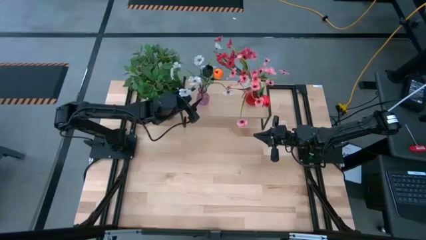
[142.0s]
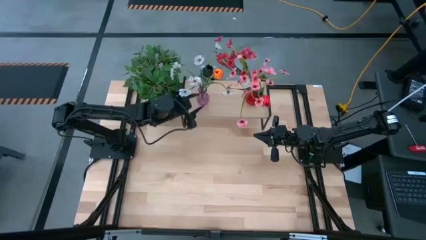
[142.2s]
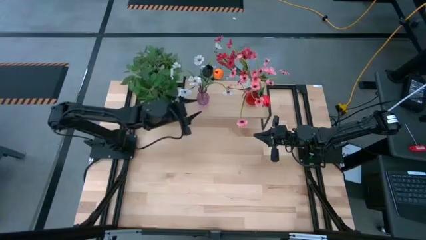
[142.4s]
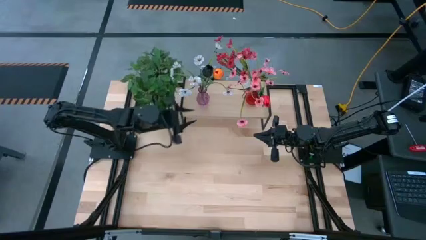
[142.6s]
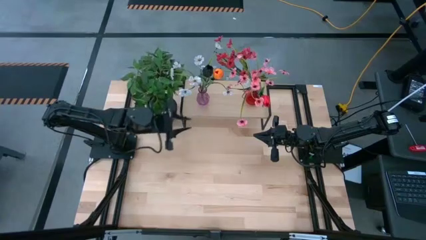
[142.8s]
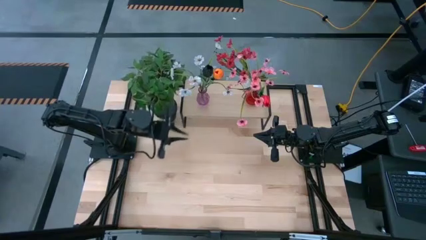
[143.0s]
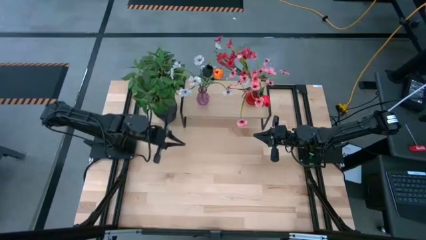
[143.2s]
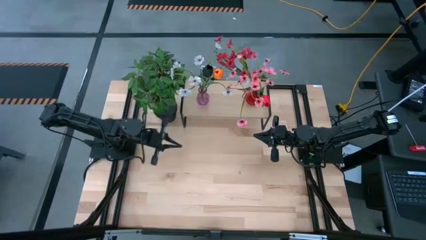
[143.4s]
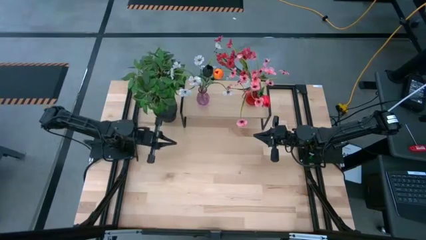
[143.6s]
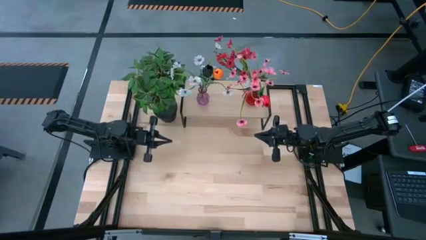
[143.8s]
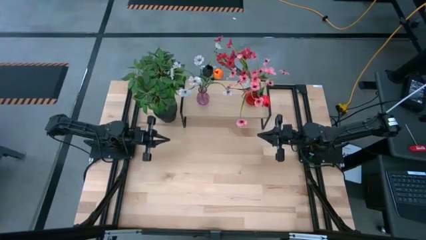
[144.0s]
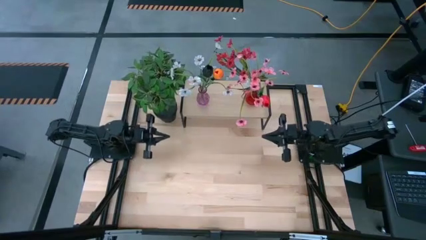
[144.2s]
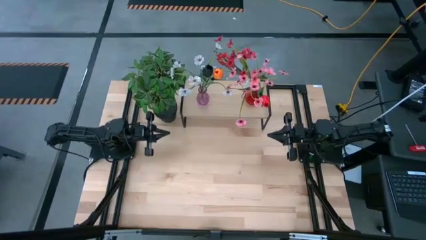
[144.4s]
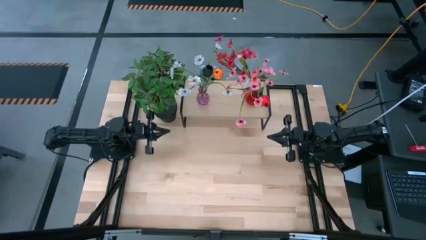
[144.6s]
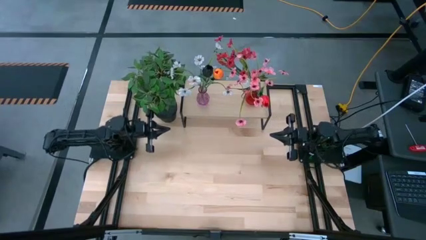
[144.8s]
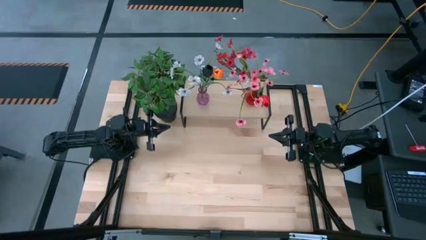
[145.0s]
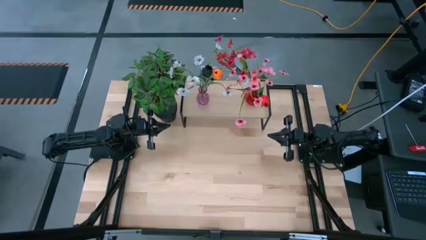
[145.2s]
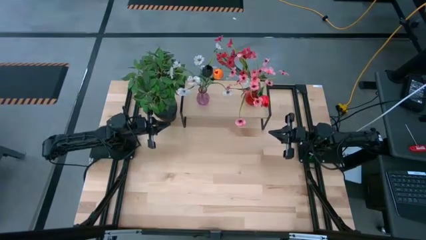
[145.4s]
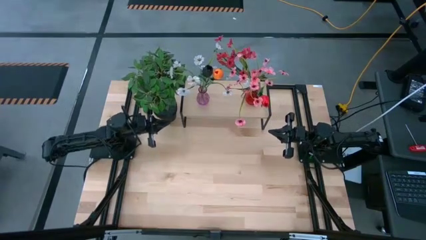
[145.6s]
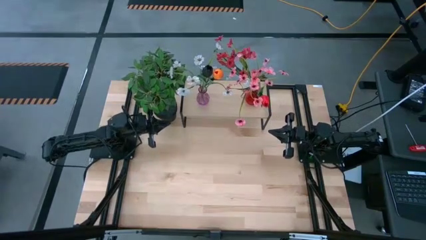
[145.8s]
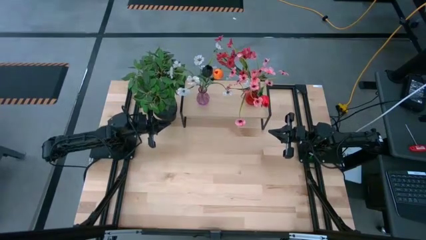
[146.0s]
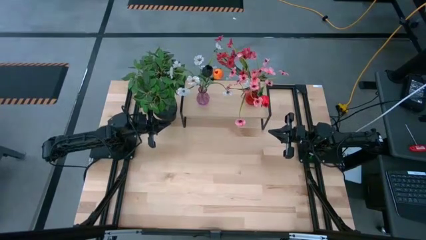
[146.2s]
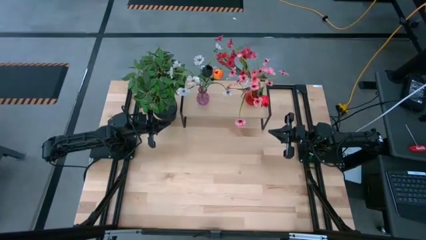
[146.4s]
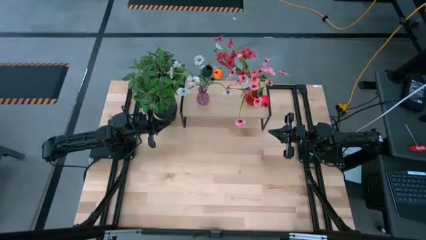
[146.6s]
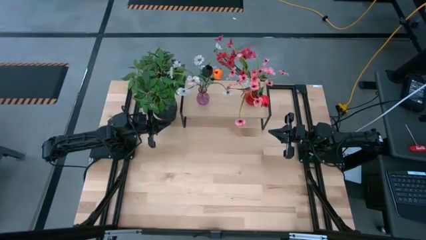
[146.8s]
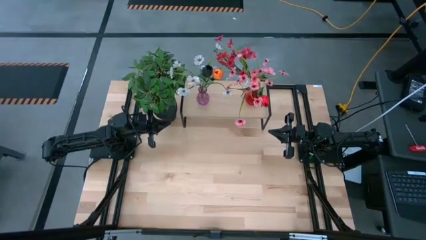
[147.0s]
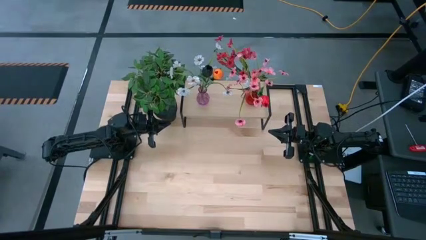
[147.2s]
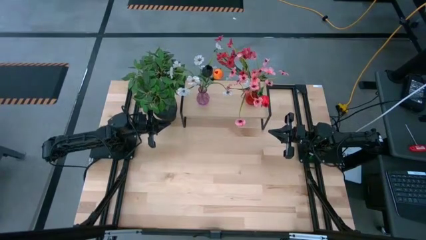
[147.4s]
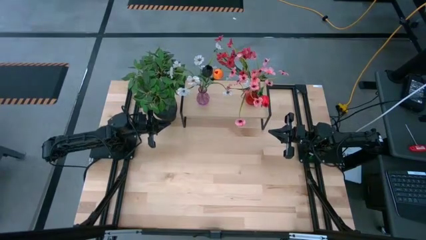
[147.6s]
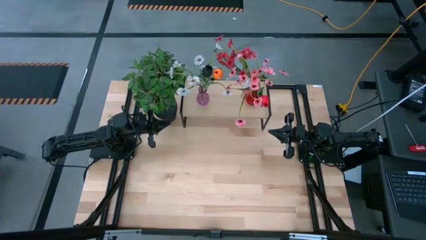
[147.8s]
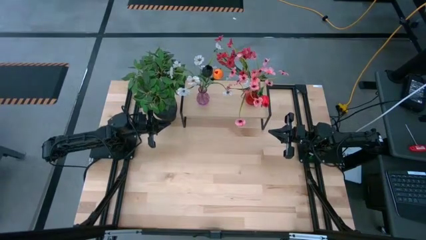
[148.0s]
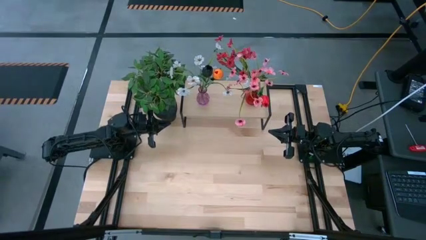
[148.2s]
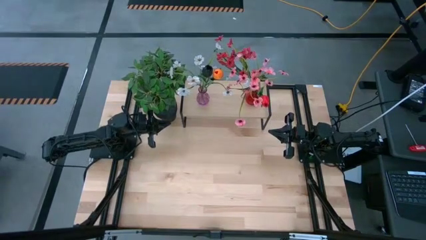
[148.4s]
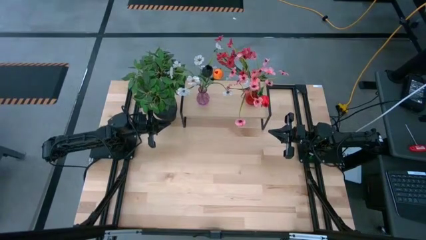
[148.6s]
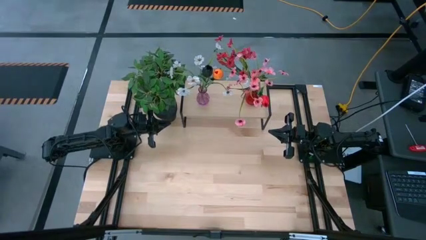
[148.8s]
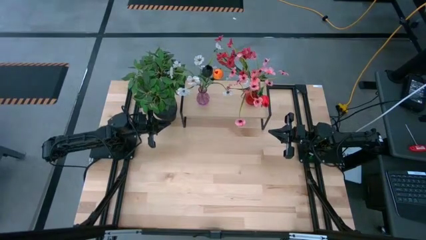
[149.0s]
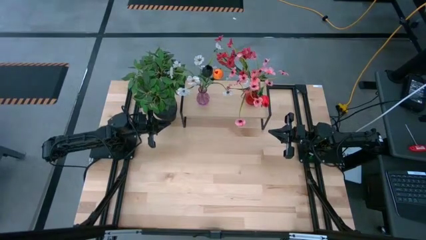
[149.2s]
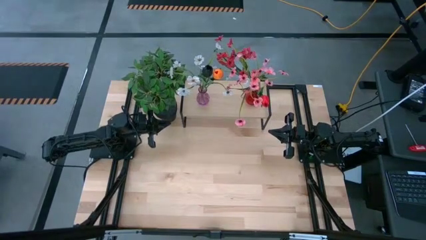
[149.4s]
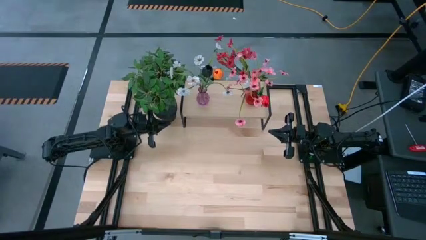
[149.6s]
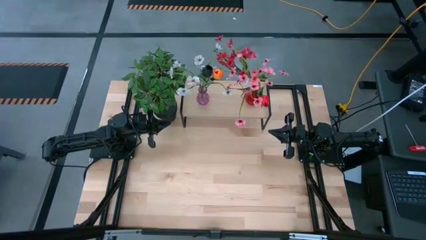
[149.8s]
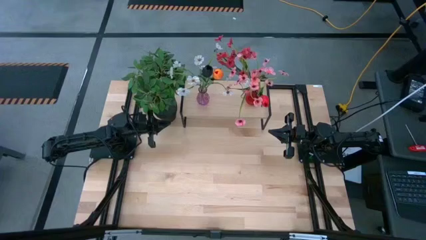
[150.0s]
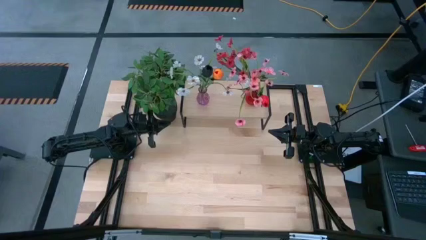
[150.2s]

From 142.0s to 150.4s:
Task: Pick and place flowers into a vace then onto a shelf
Return to Home Position

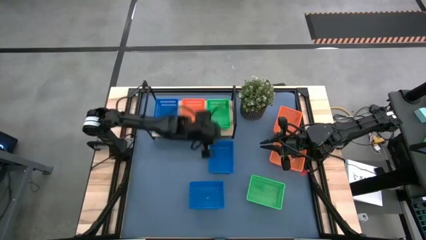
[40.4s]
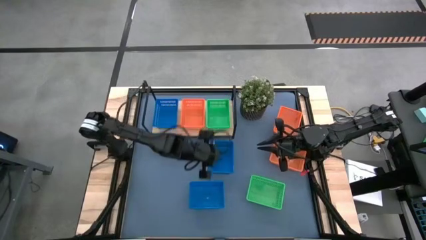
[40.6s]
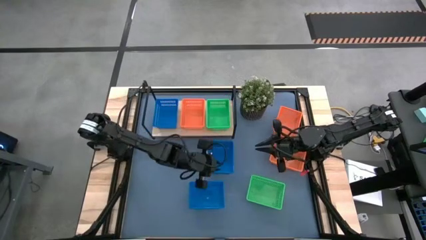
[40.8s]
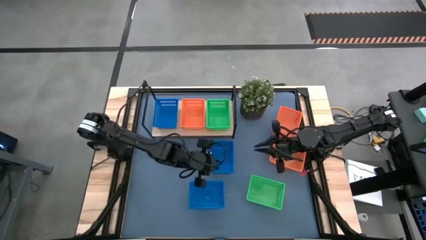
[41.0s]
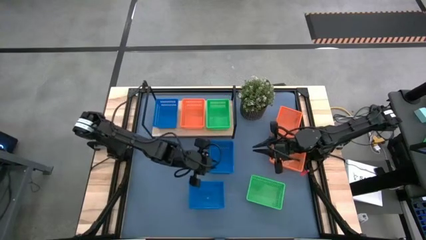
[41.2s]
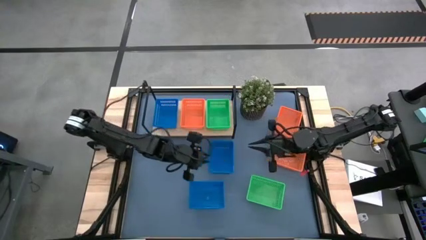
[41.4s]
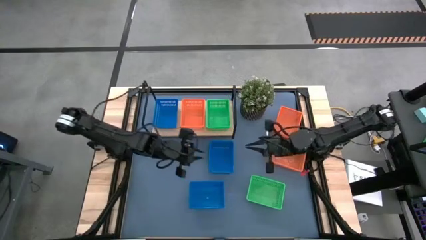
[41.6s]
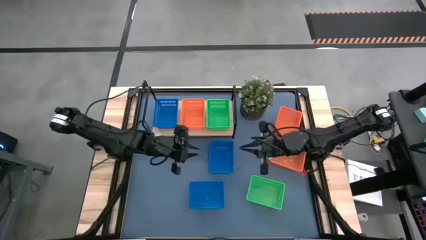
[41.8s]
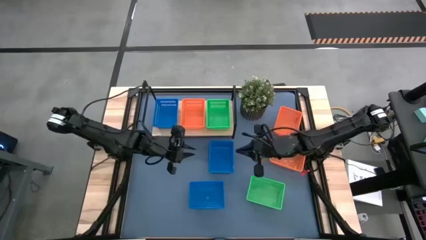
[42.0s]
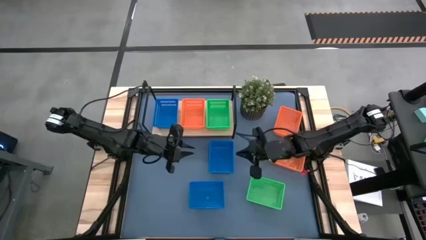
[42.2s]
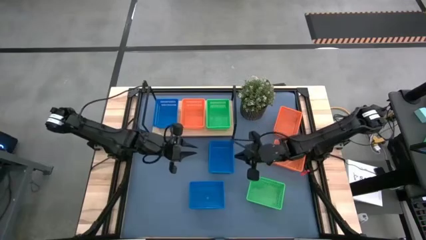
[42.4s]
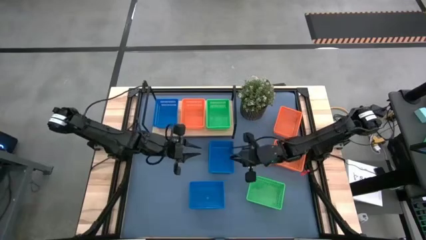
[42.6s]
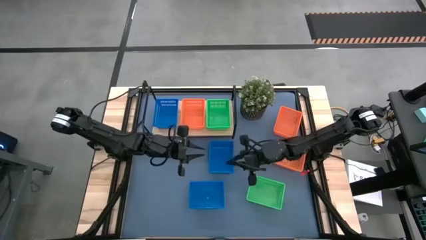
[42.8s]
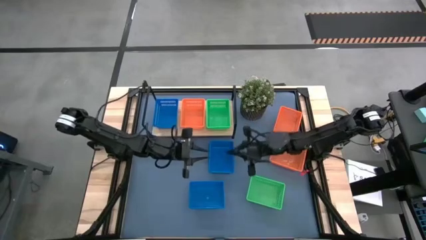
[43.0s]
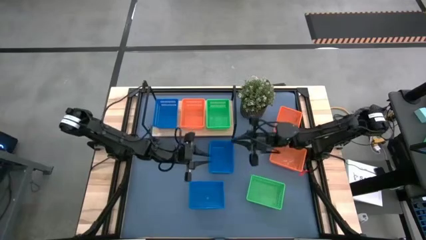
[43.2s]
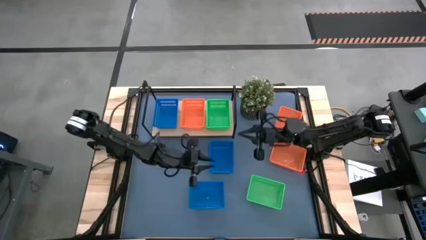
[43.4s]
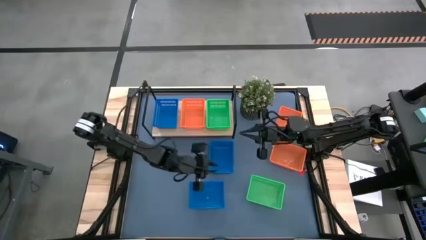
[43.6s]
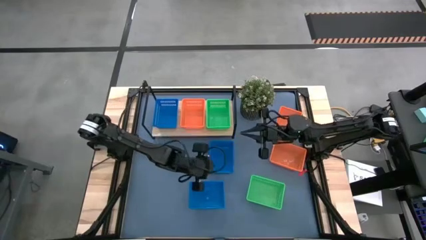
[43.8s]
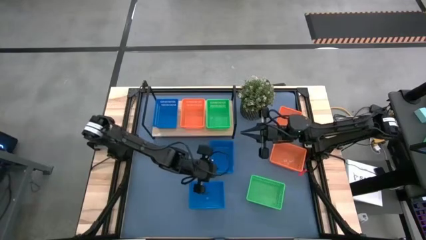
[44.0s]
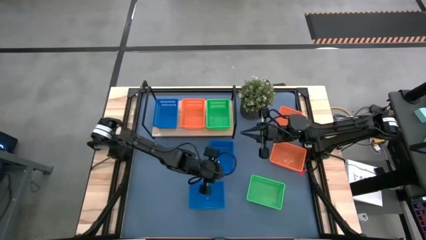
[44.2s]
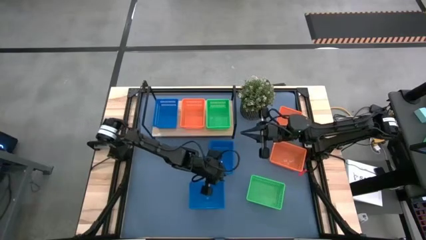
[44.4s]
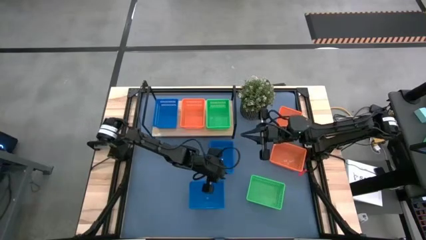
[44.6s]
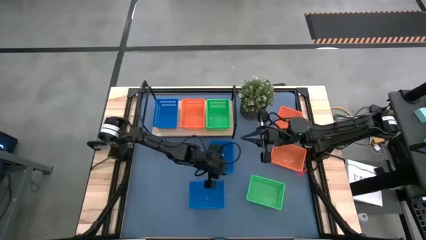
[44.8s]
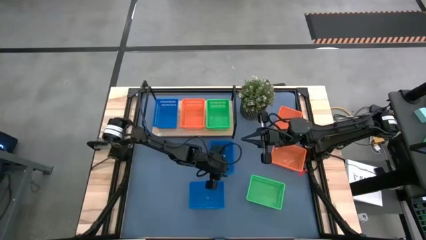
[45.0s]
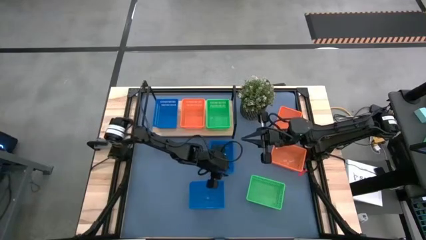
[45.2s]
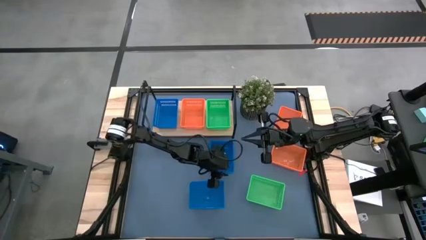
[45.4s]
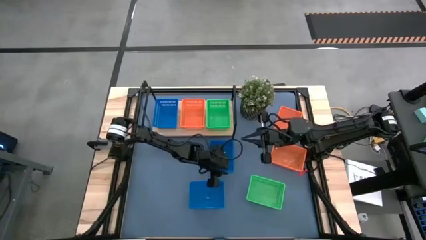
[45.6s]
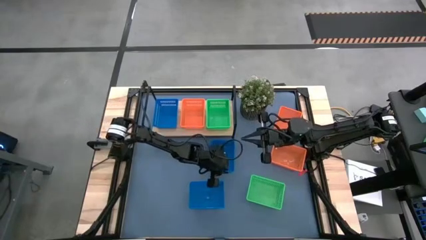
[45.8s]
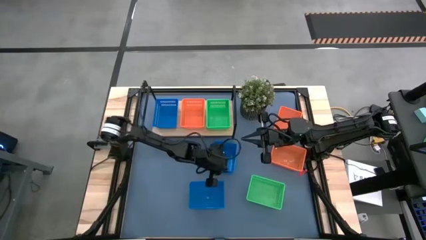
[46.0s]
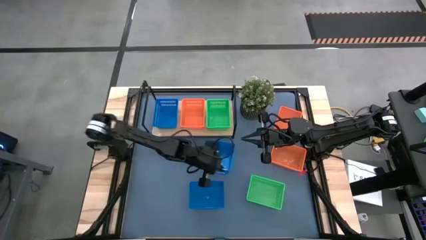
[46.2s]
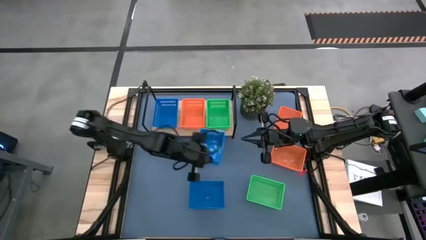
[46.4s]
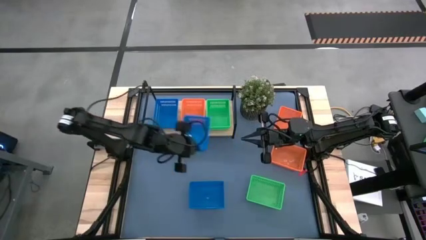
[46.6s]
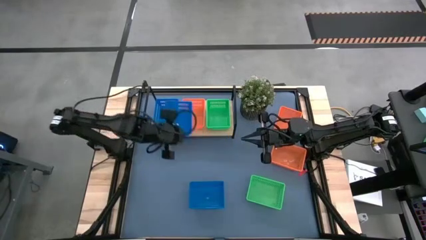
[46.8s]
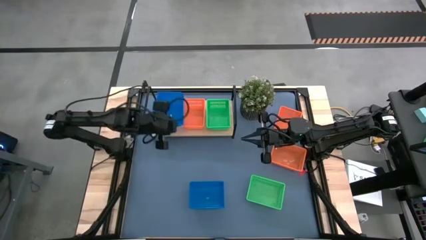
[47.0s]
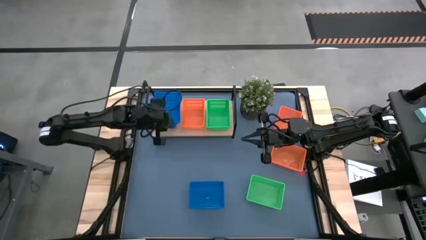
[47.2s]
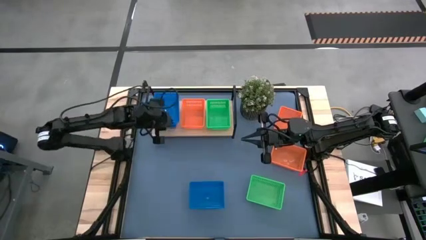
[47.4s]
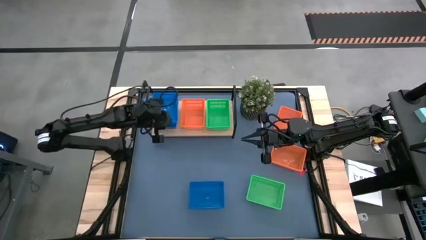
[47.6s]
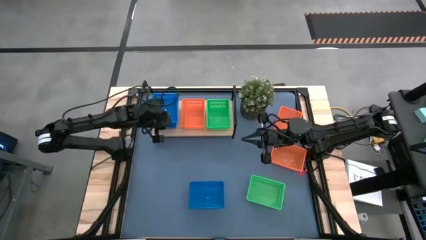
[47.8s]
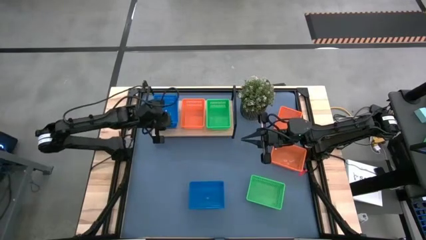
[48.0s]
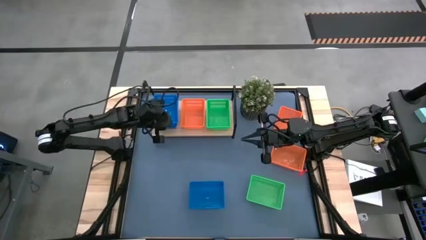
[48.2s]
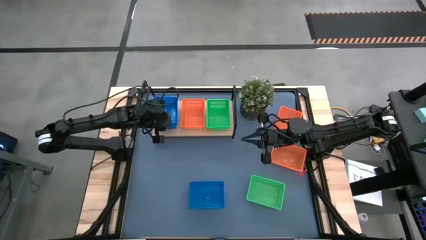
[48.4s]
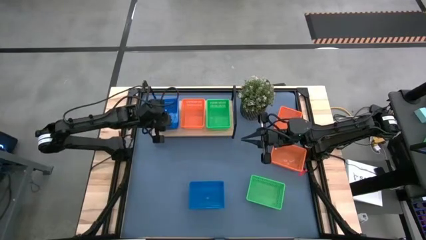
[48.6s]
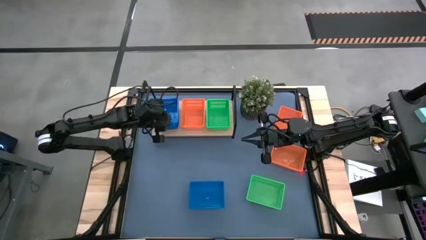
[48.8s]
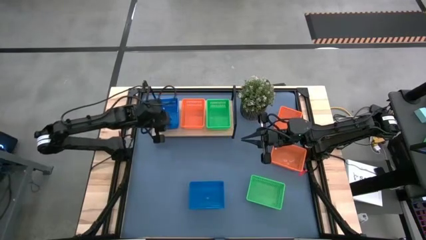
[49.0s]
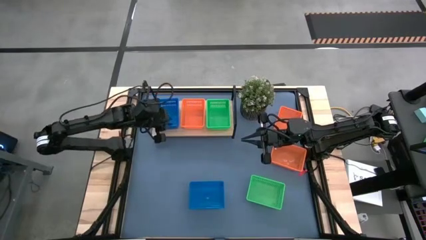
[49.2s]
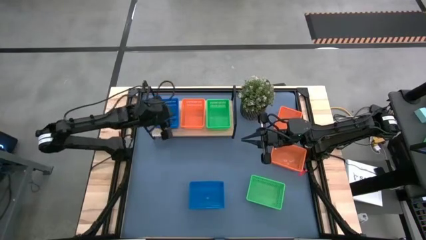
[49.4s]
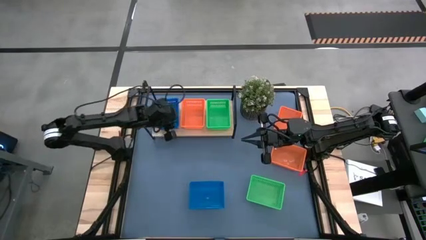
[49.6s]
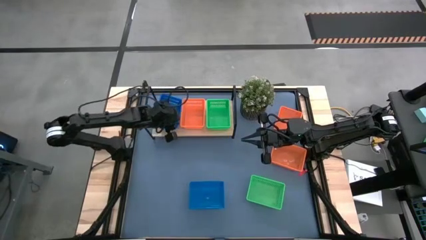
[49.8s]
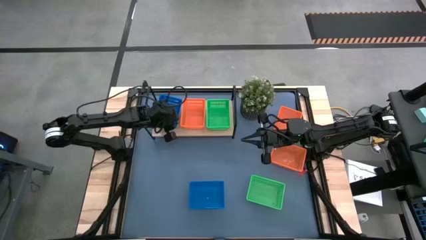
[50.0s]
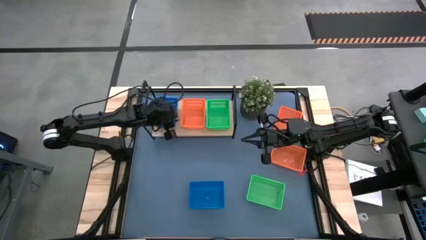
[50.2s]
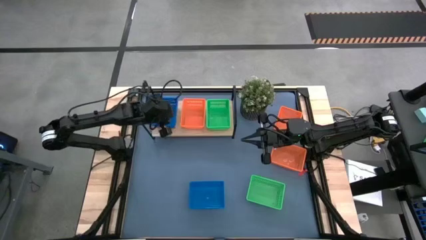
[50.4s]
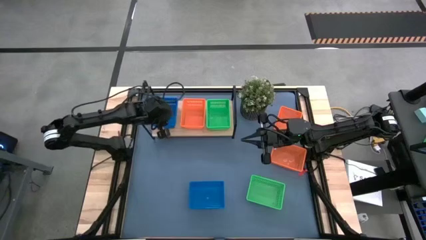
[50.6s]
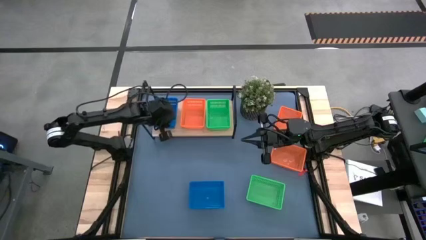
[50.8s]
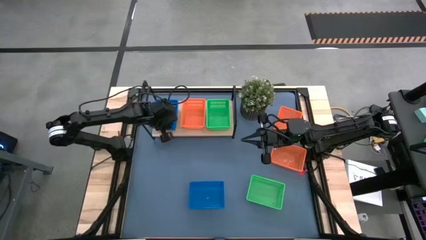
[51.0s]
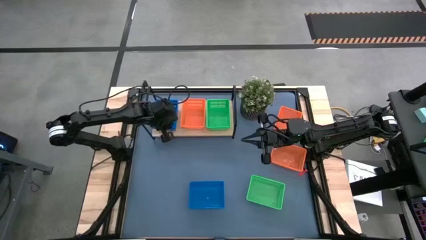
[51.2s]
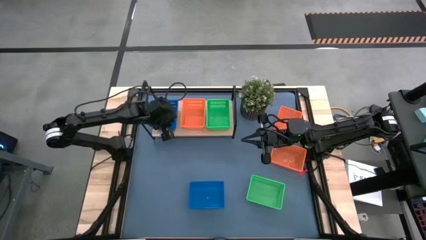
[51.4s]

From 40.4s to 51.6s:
Task: Stack baskets on shelf by color
Stack the top blue bin on top of the blue bin on the shelf
